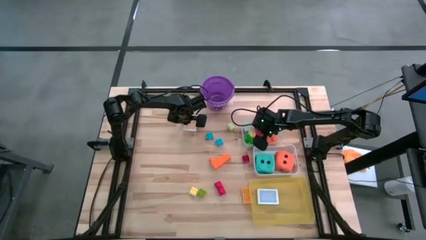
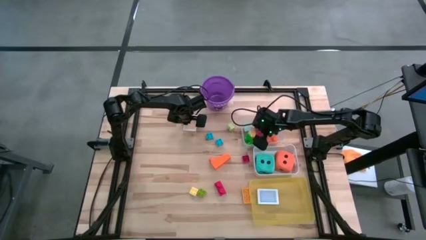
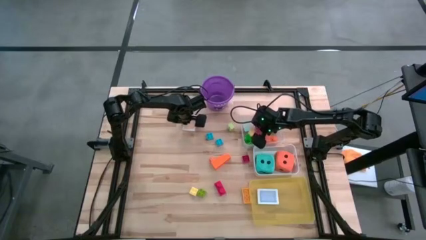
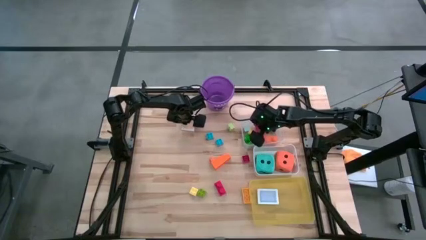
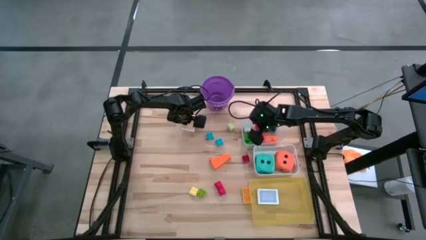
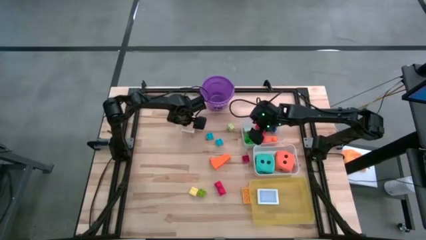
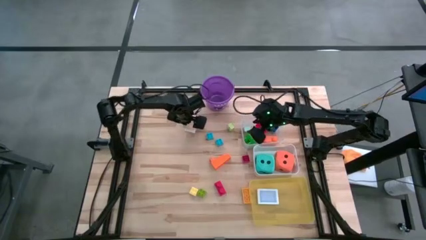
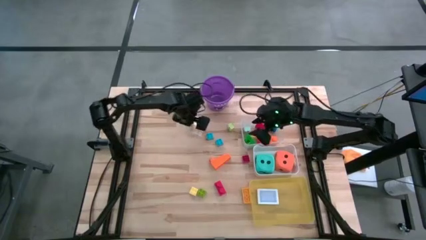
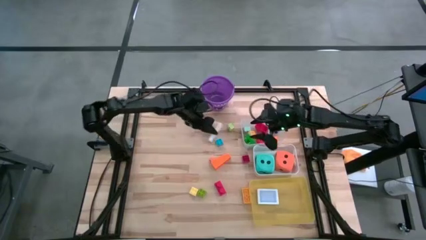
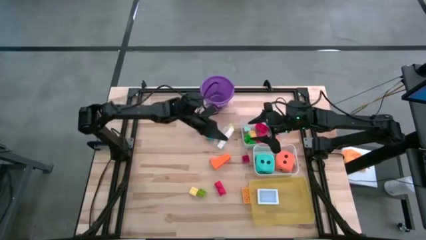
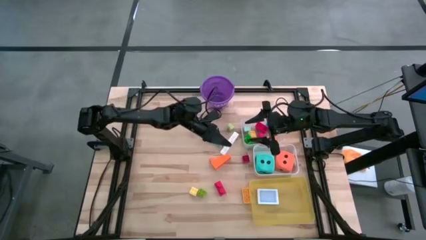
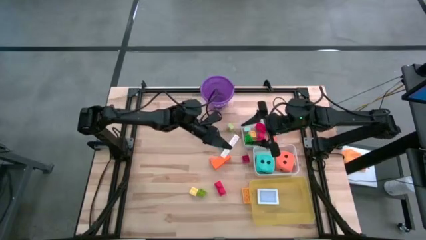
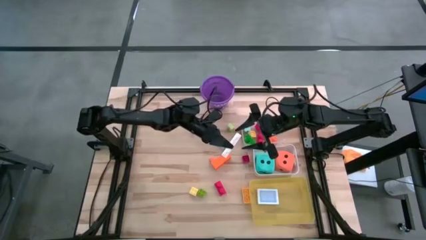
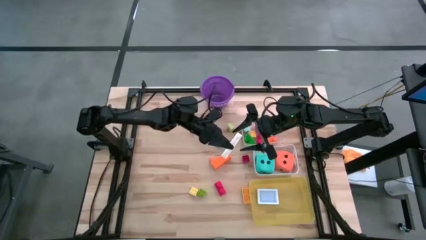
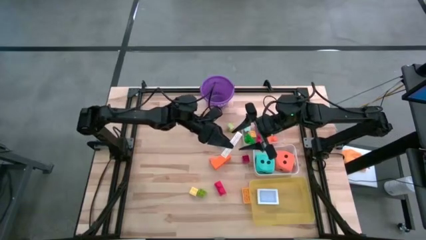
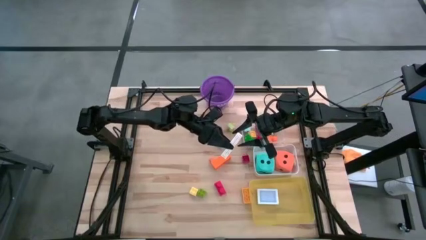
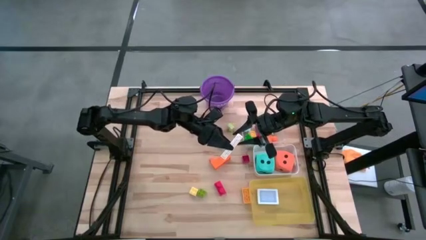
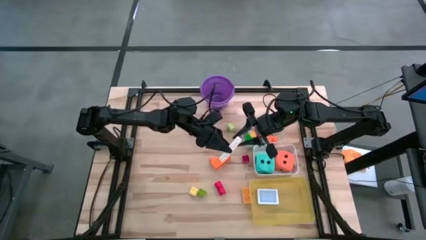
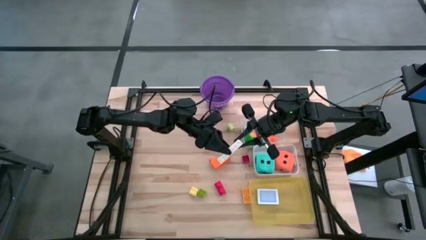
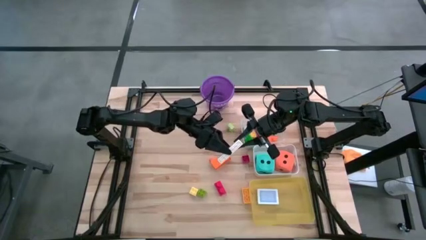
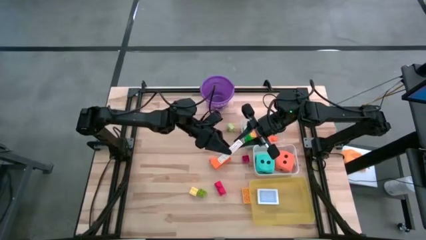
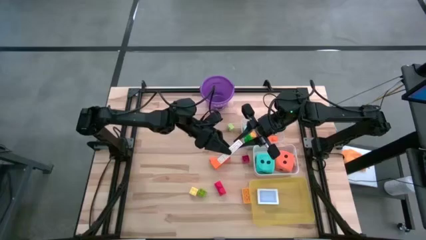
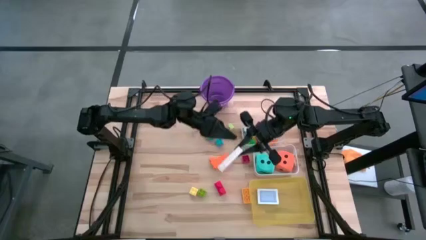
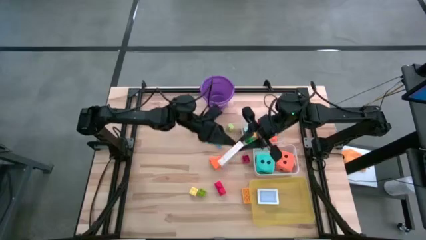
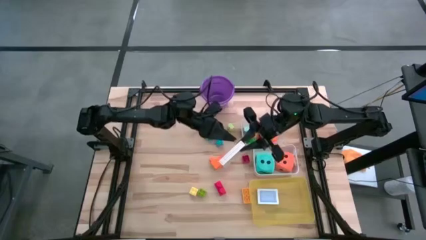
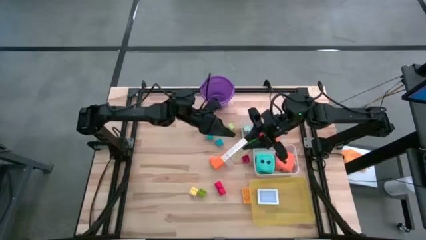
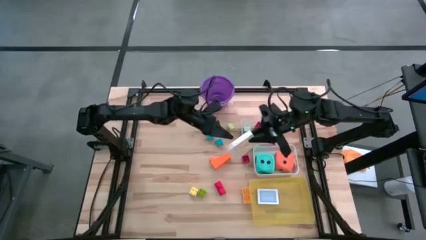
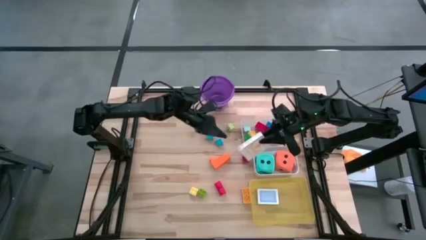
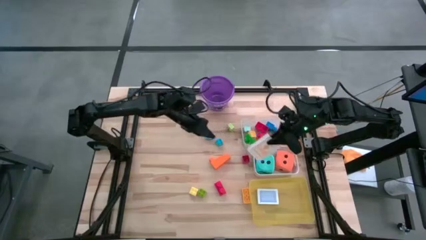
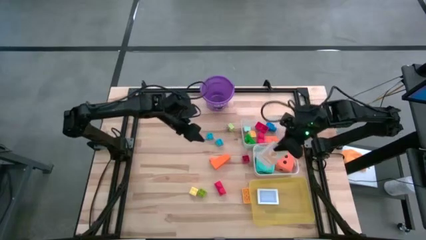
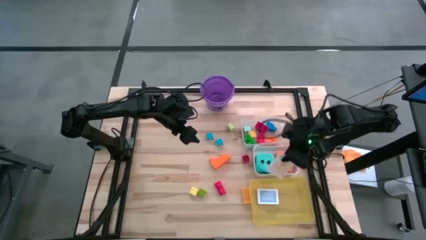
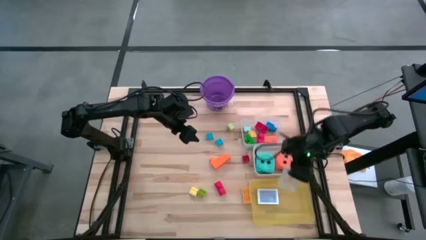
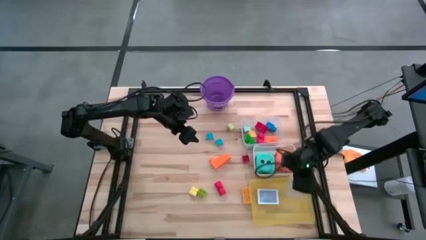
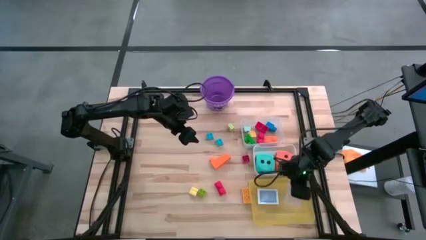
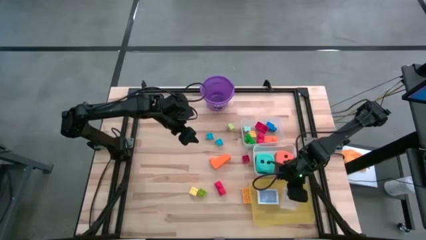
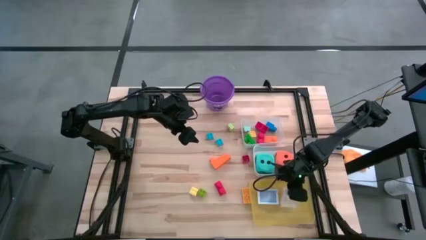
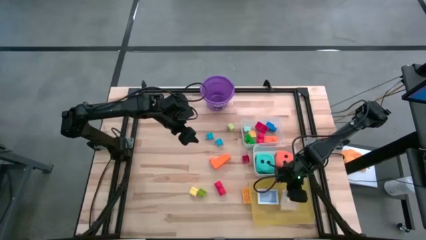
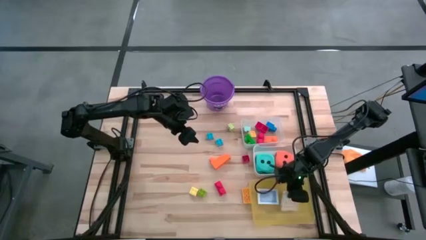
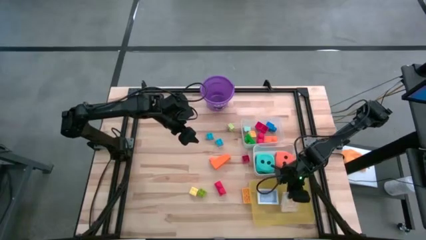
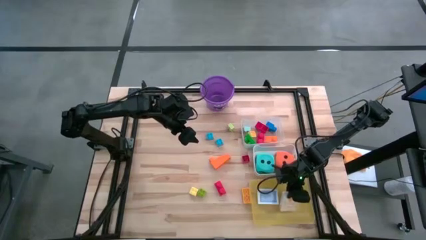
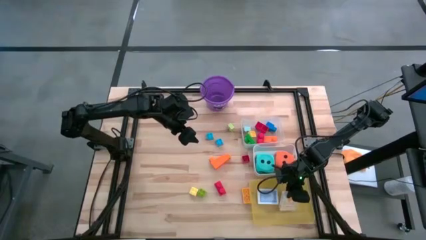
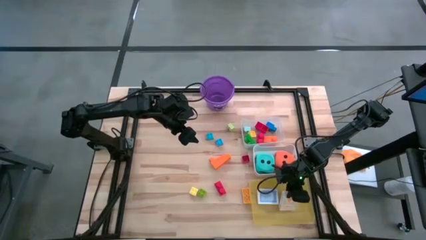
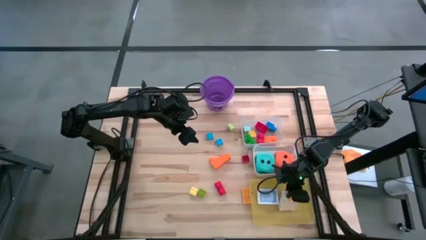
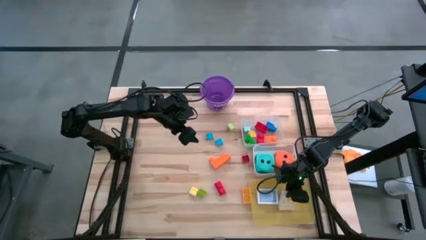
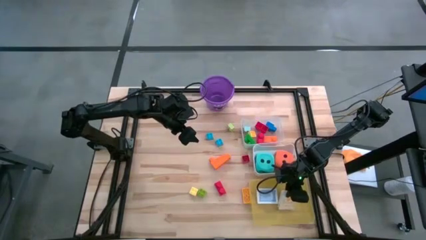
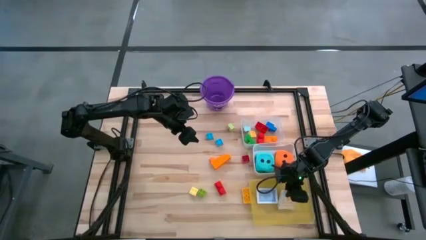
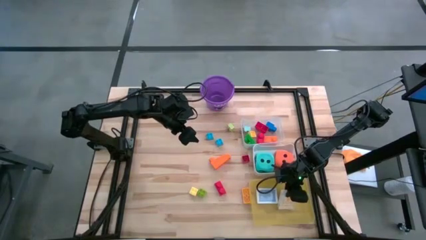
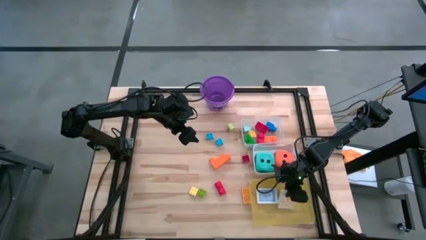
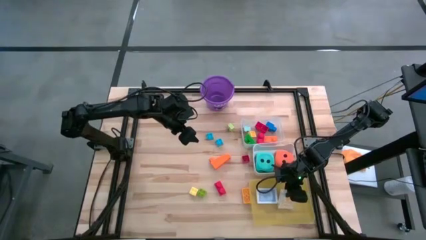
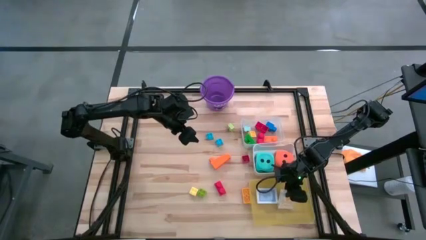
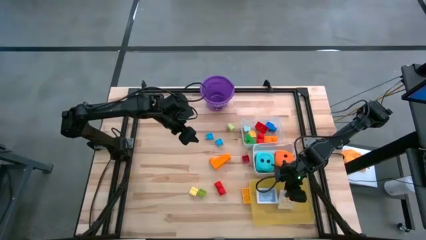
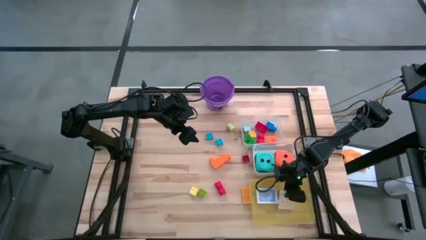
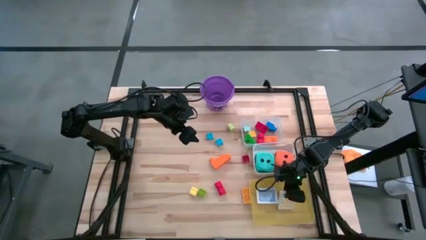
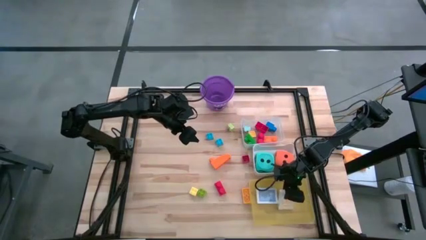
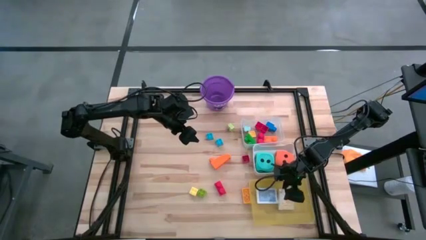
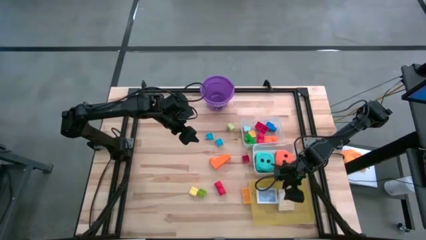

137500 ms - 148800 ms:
Task: Pick & Place Toys
Put the yellow deck of cards into the yellow bin

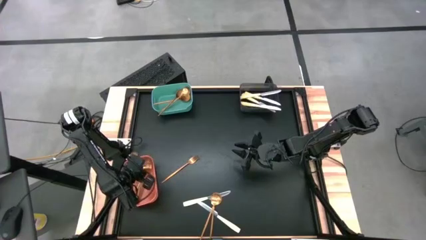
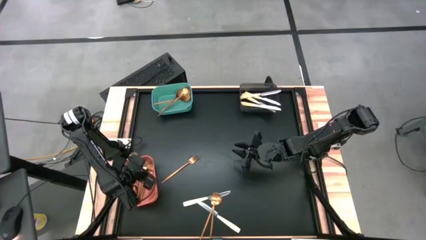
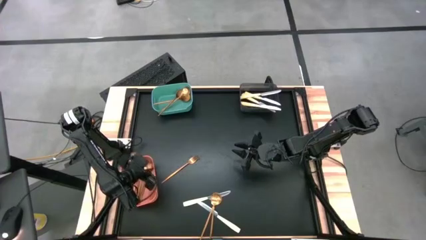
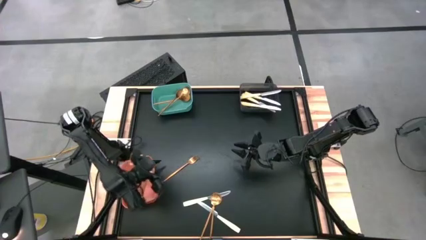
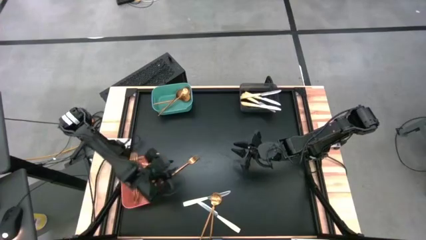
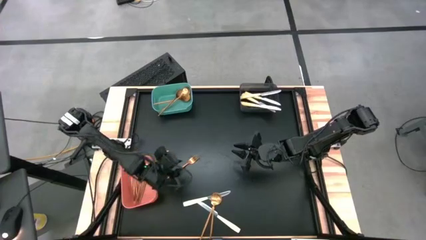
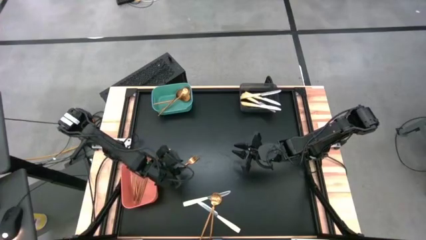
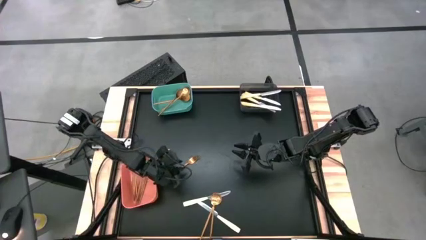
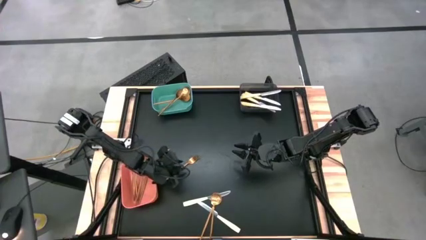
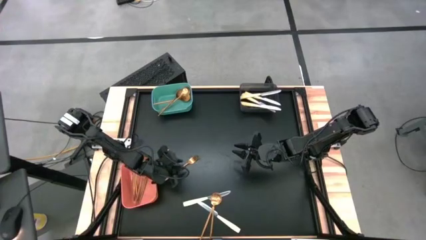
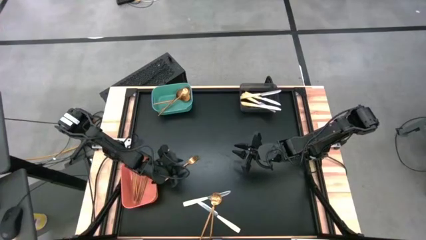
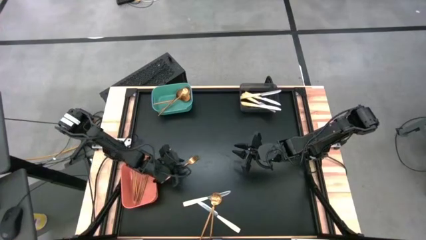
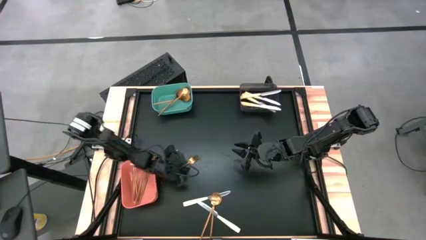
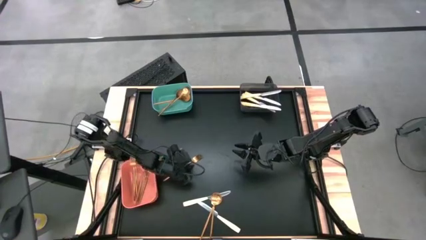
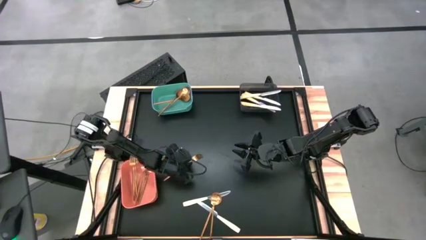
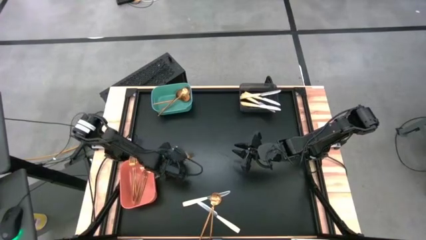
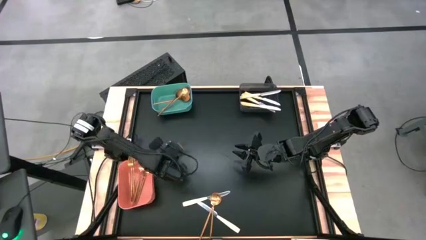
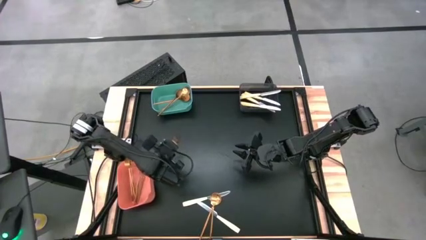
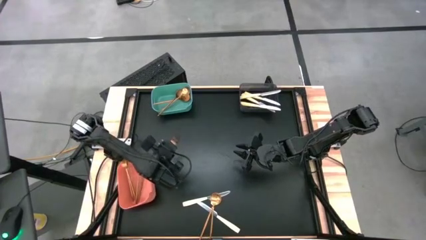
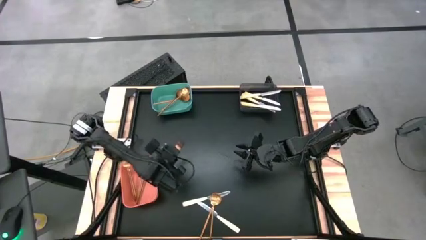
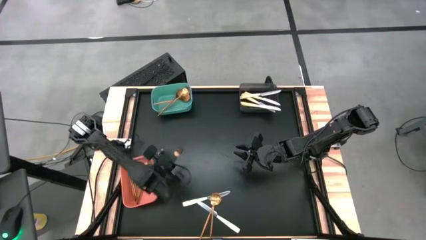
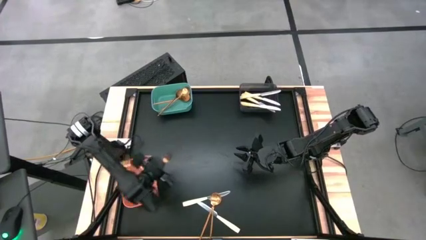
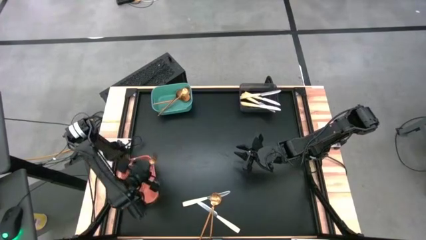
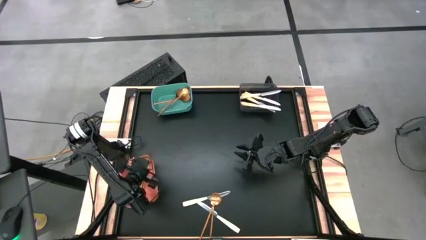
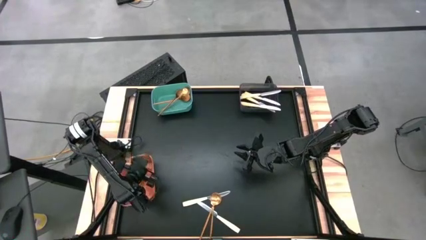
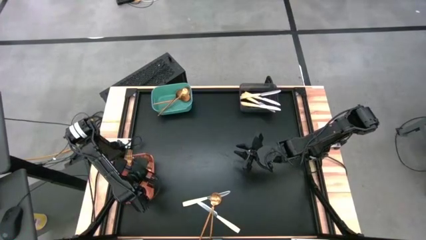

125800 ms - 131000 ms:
Task: Sort silverware by color (type)
Put the gold fork into the orange bin

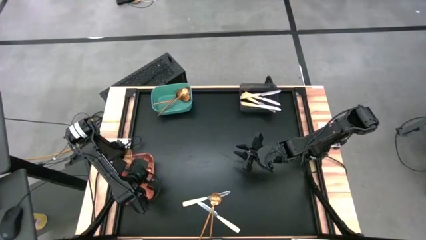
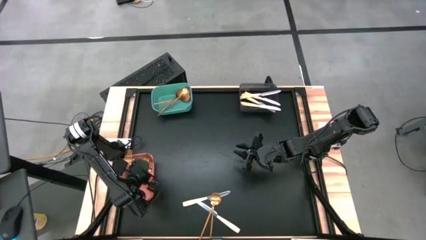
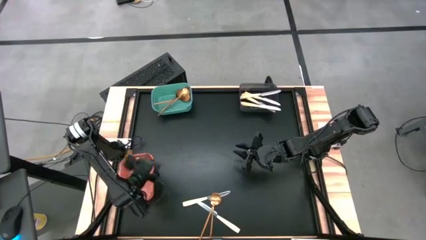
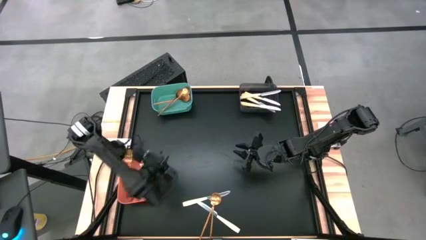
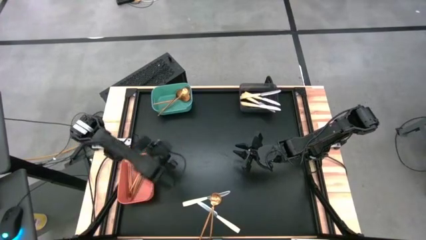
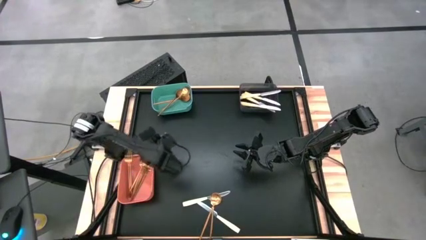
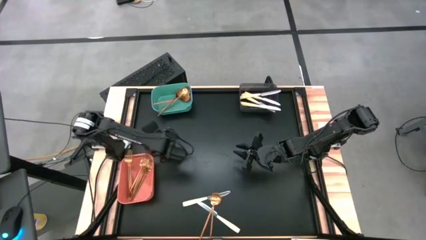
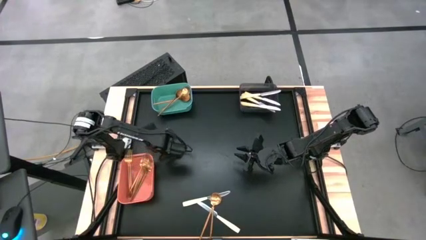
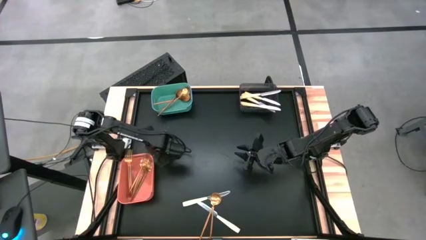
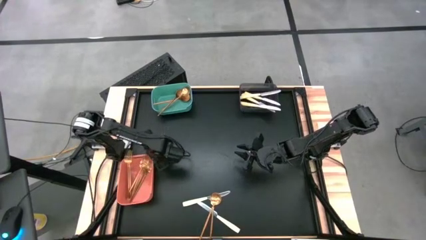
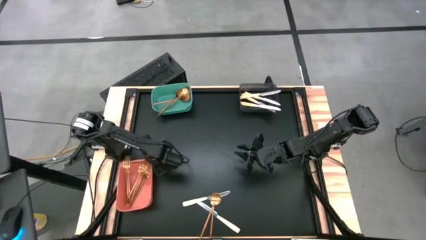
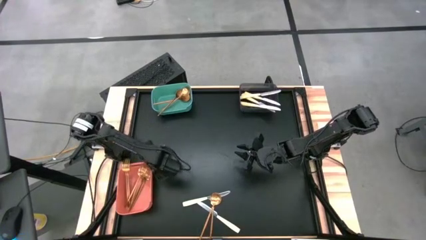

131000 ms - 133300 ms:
Adjust the orange bin on the table
